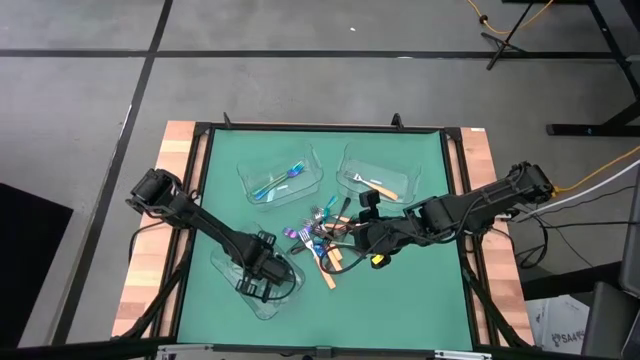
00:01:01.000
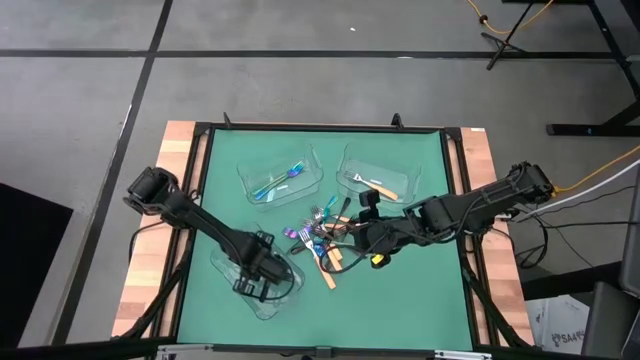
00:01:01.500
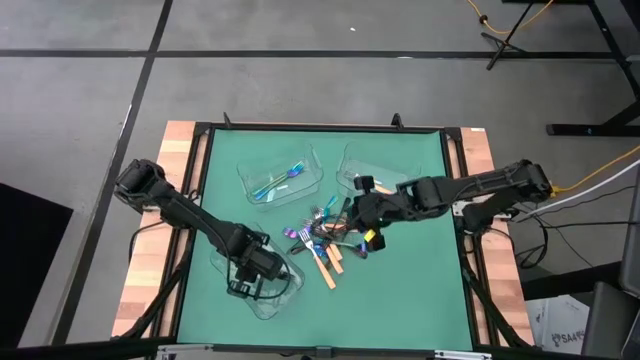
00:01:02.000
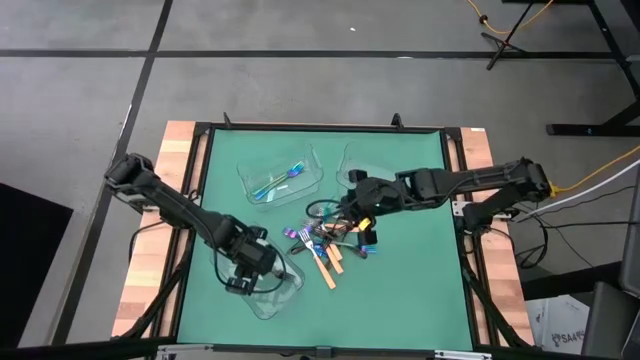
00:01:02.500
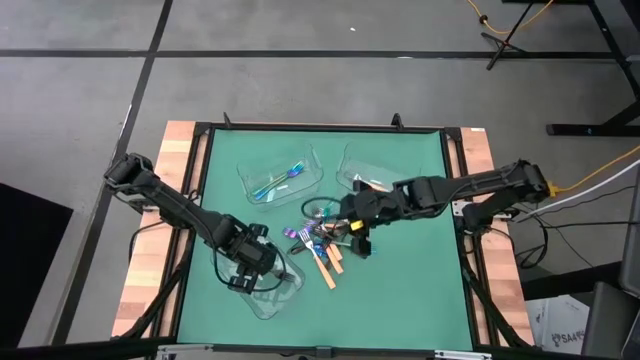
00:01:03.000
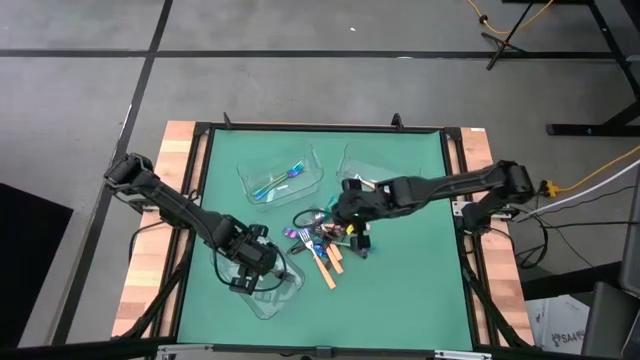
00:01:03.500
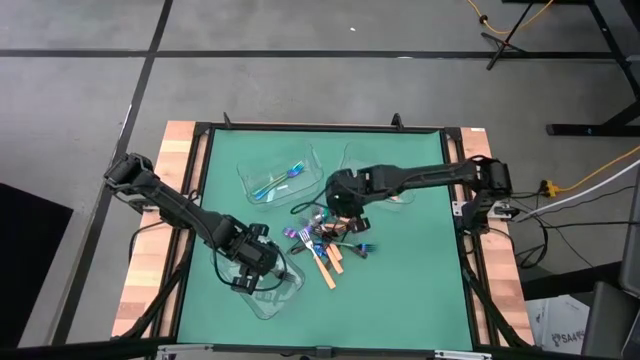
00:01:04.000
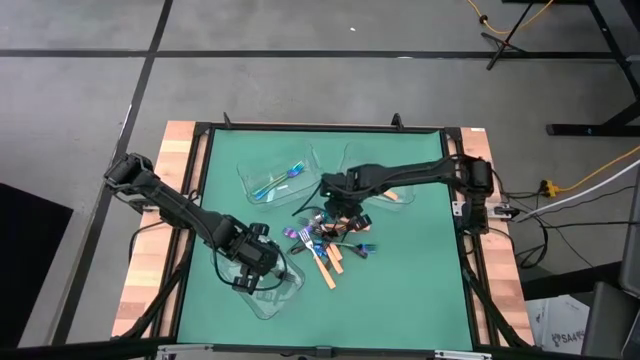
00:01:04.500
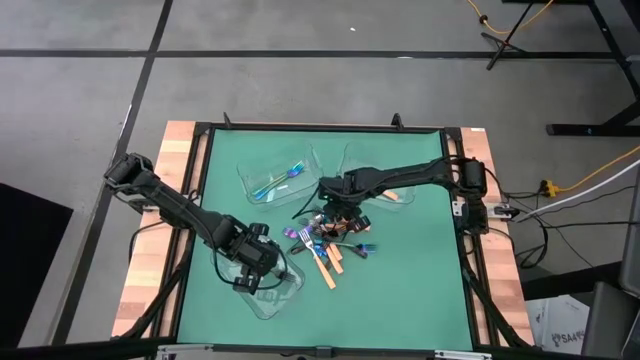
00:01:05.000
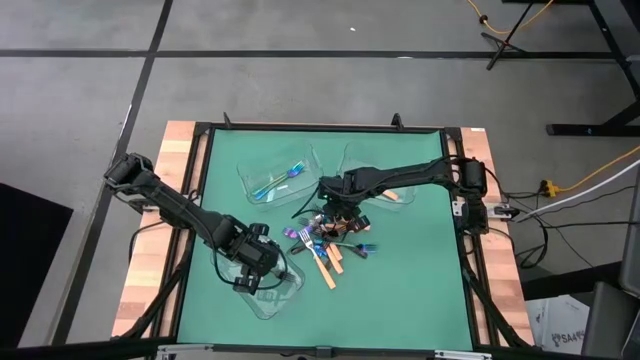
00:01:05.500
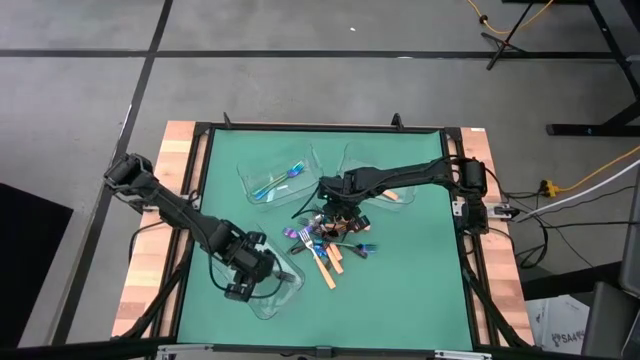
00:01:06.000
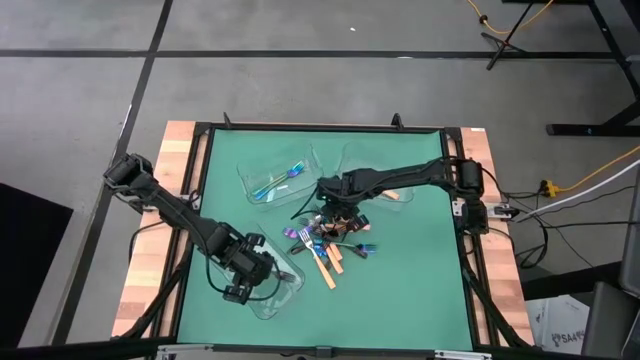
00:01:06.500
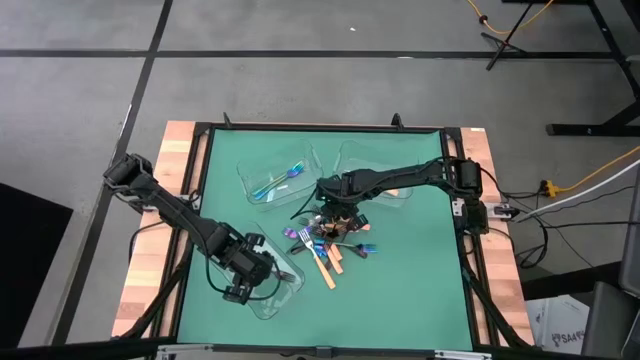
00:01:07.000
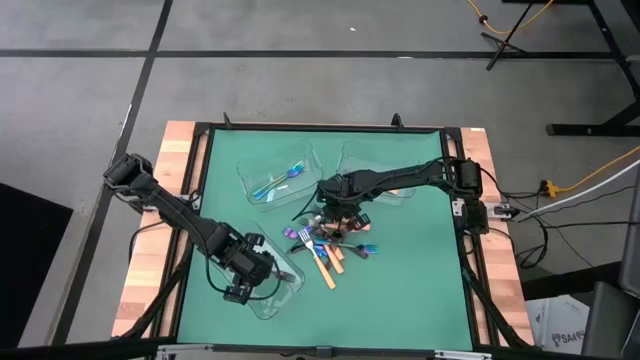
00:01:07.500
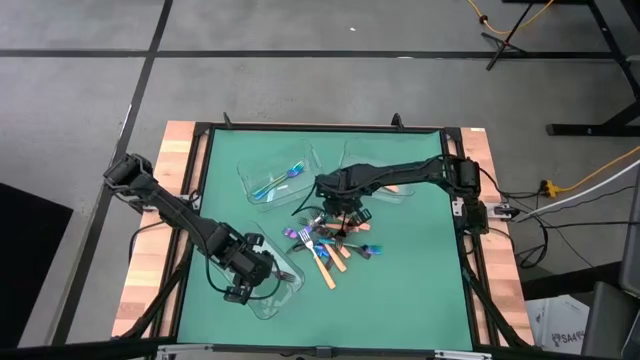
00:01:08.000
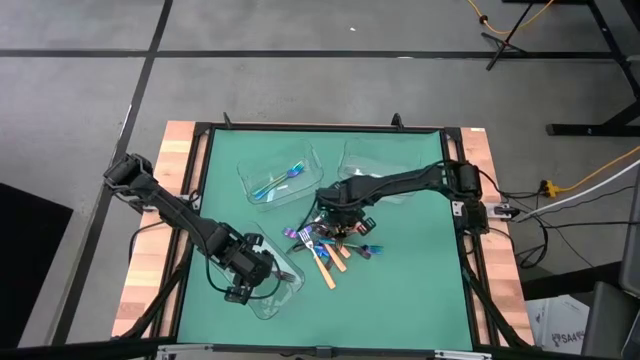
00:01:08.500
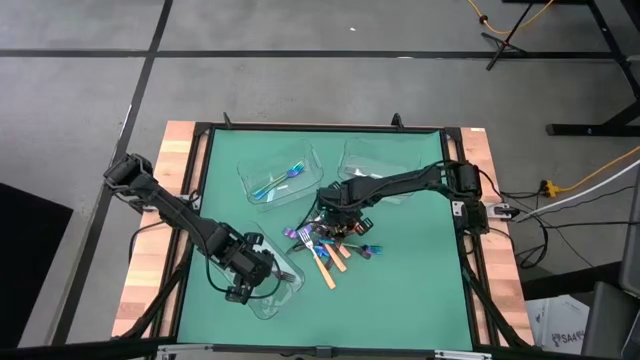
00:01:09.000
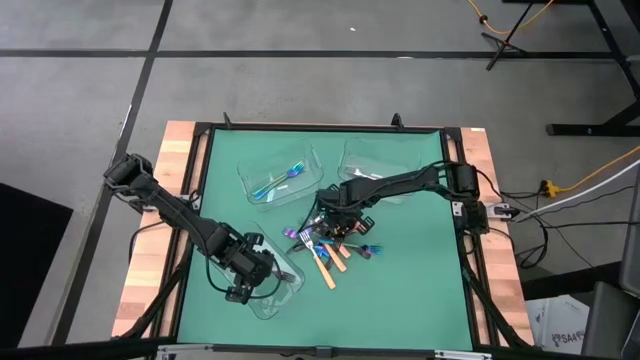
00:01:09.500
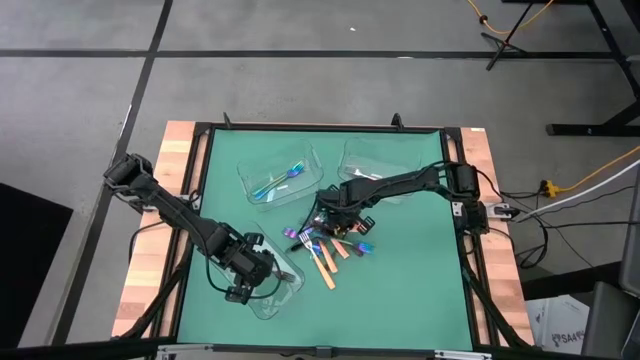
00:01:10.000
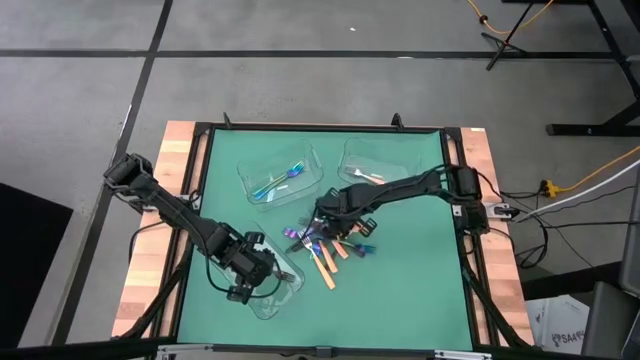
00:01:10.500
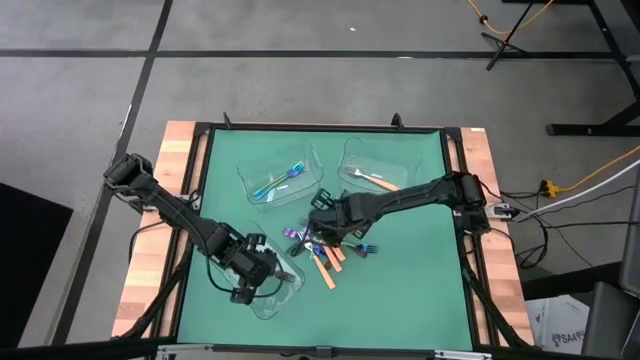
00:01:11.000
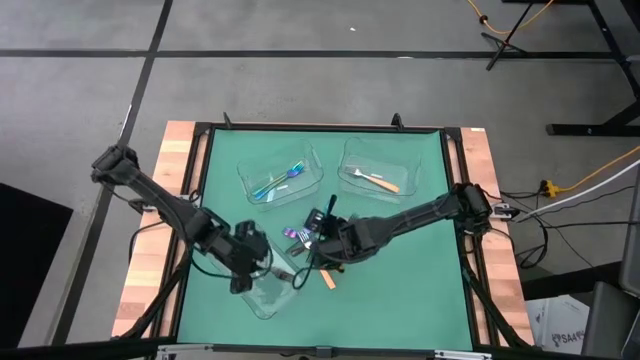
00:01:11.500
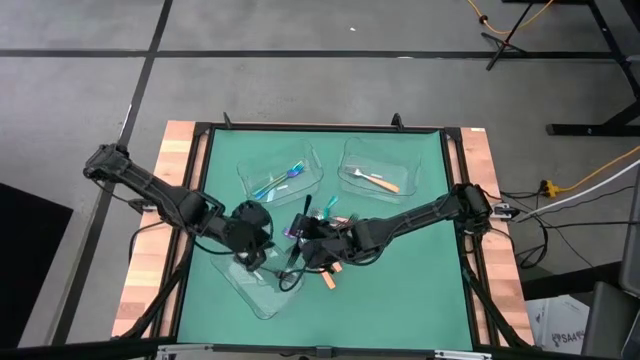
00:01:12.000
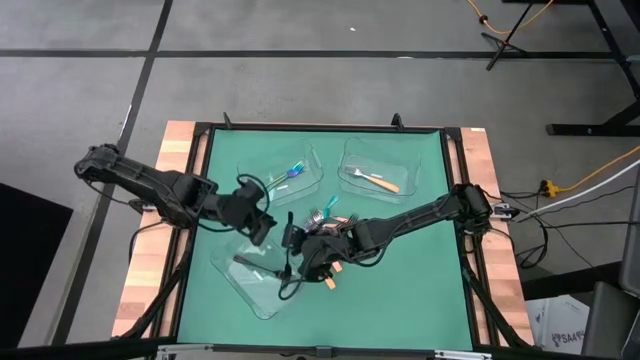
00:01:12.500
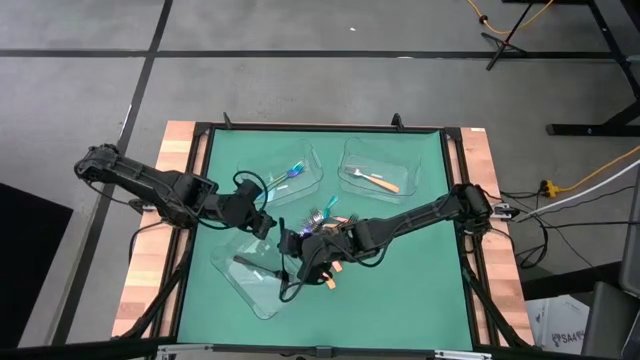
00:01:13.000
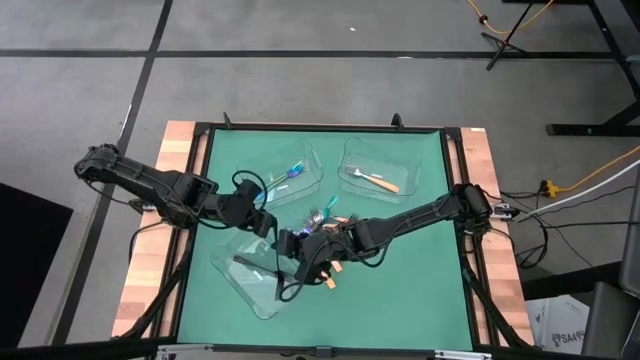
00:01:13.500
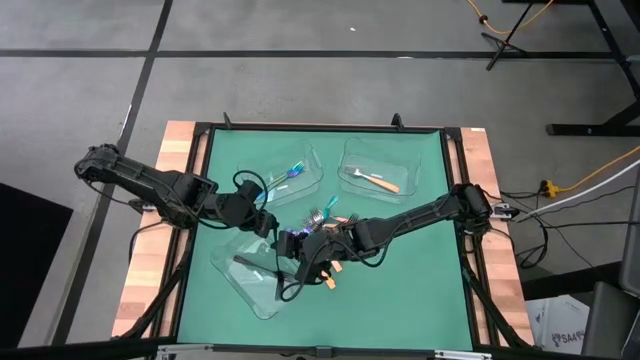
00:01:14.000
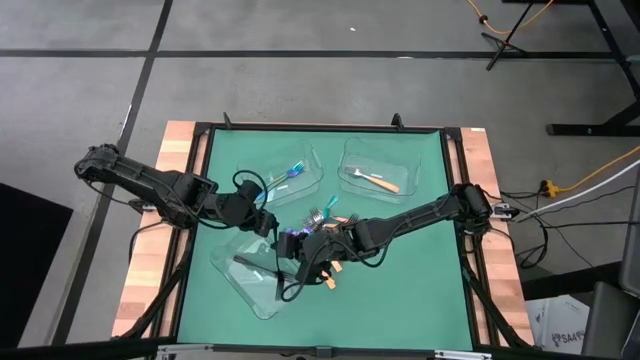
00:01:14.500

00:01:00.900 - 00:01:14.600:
Task: Sort silverware by color (type)
Put the black fork into the bottom transparent bin
